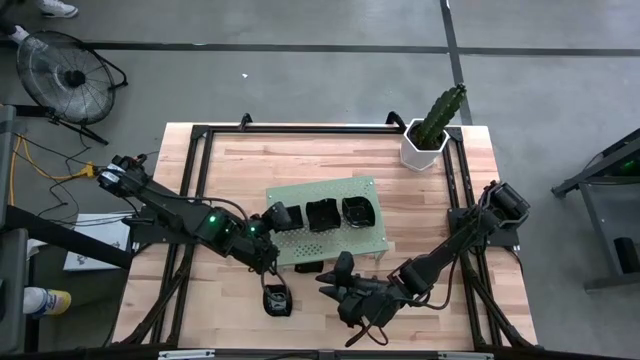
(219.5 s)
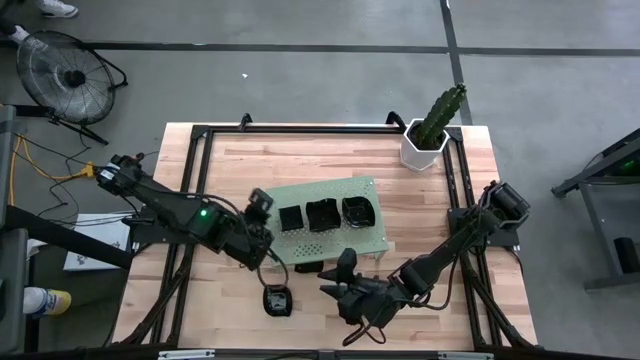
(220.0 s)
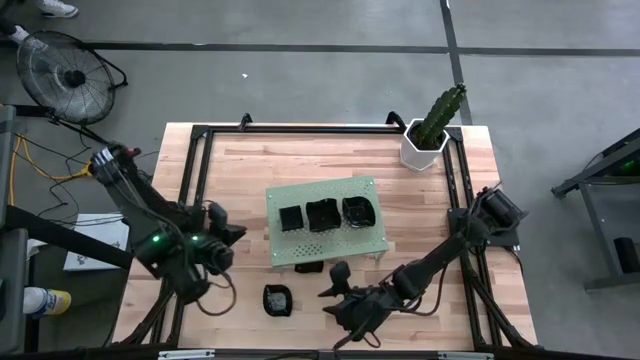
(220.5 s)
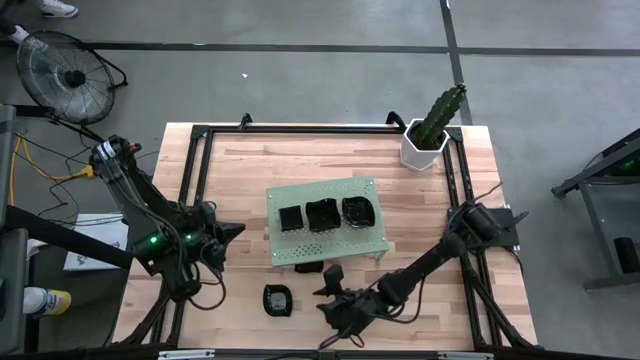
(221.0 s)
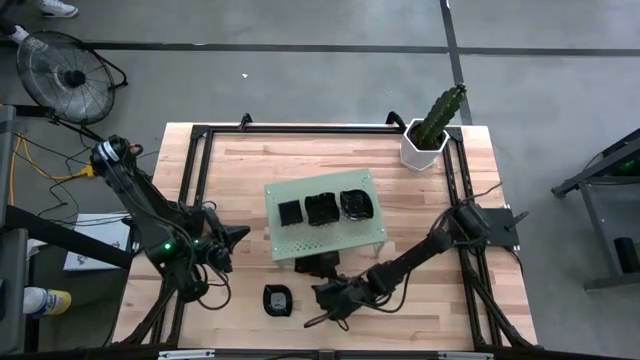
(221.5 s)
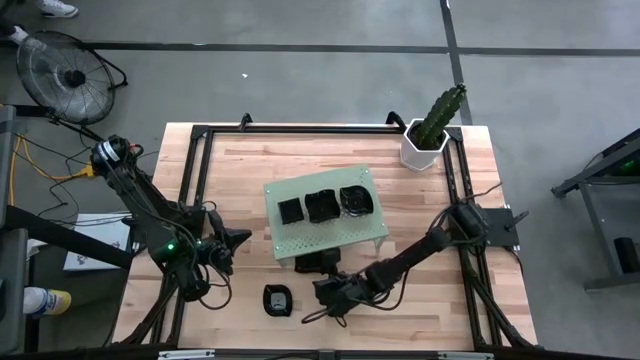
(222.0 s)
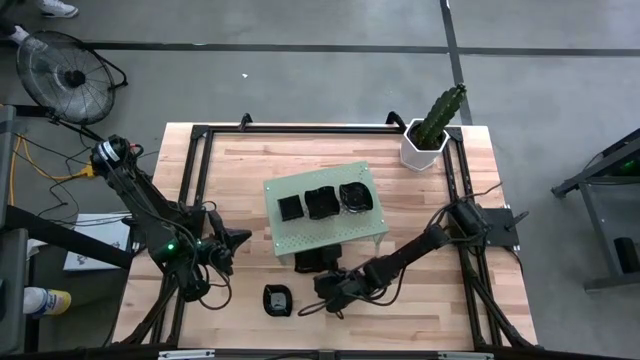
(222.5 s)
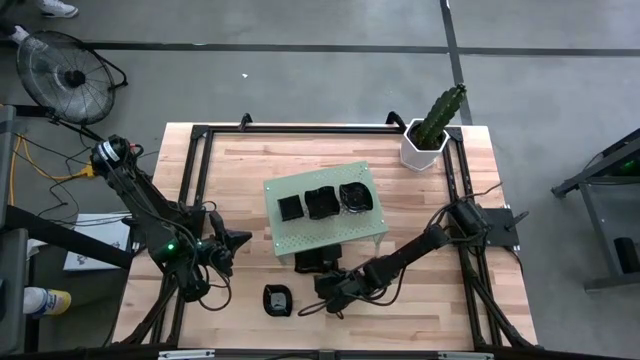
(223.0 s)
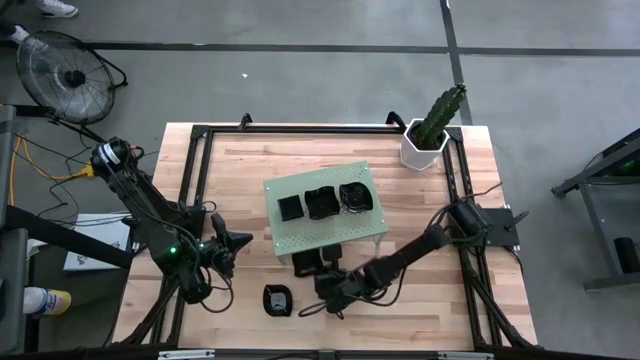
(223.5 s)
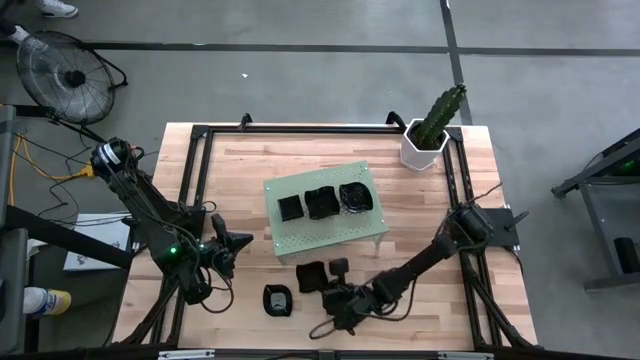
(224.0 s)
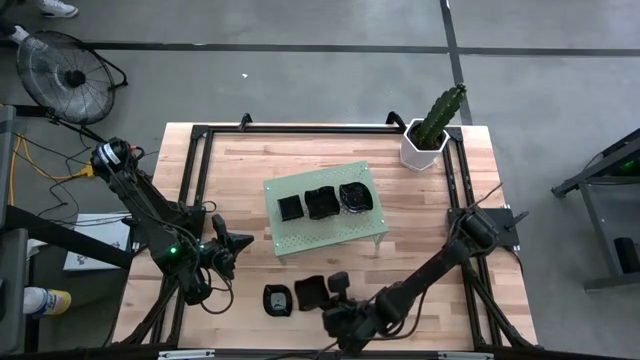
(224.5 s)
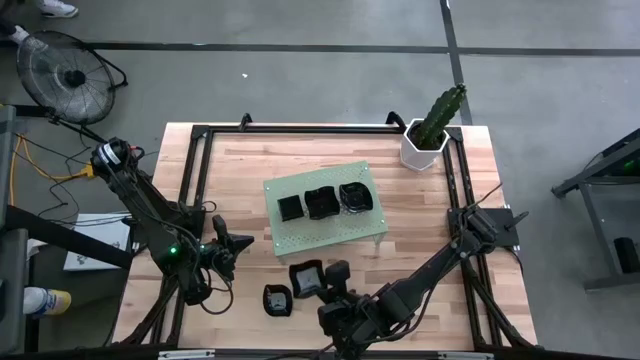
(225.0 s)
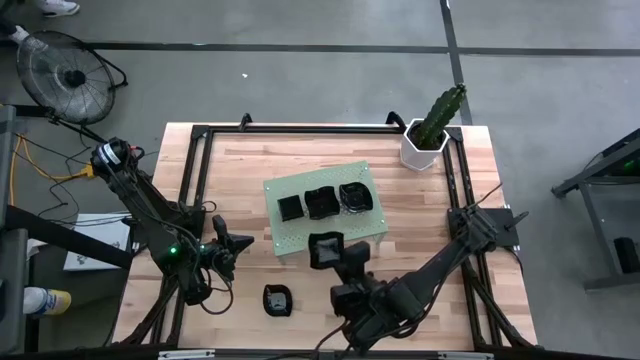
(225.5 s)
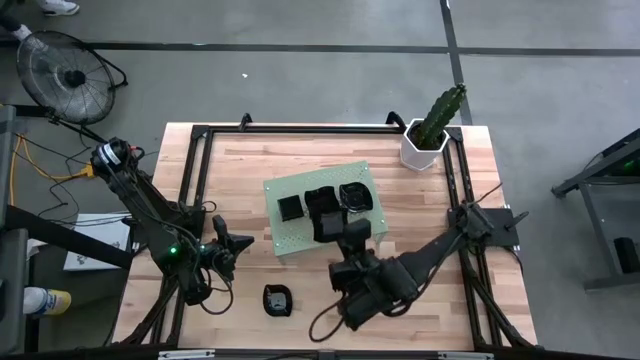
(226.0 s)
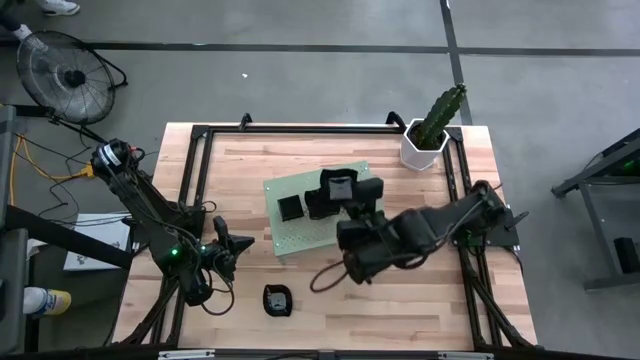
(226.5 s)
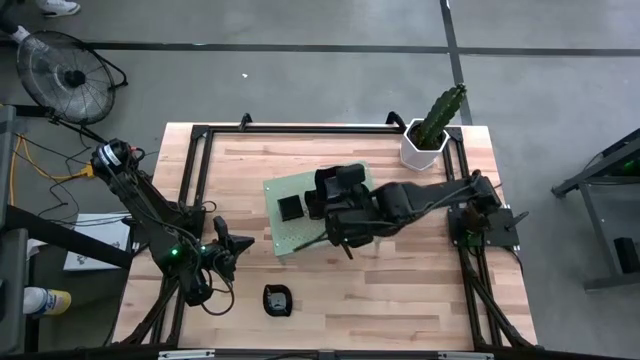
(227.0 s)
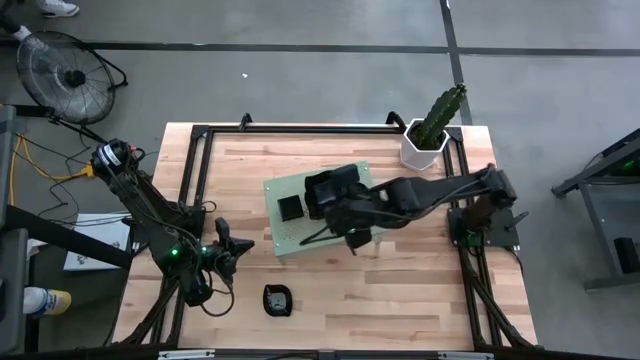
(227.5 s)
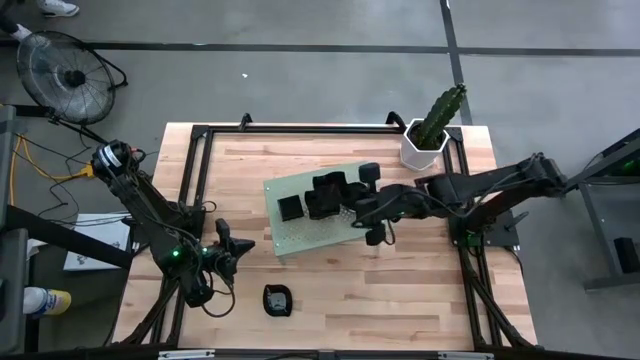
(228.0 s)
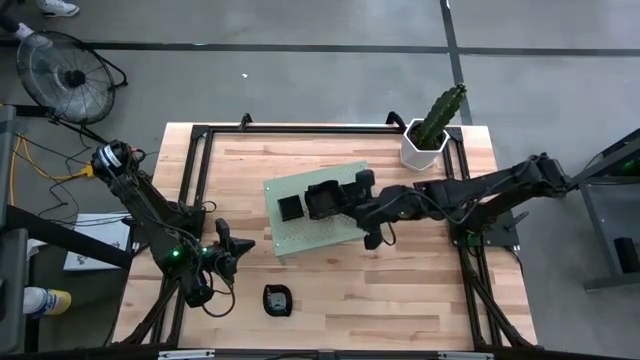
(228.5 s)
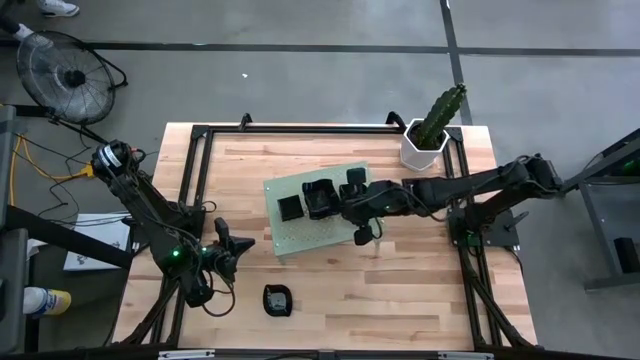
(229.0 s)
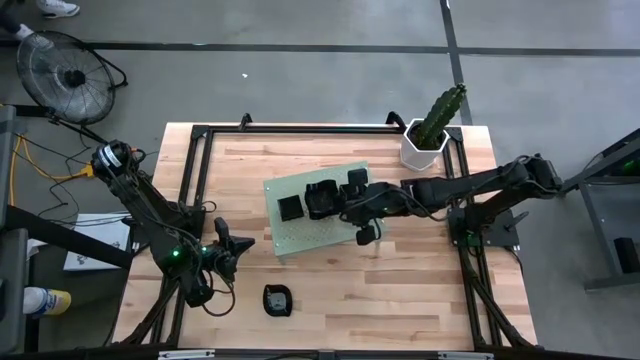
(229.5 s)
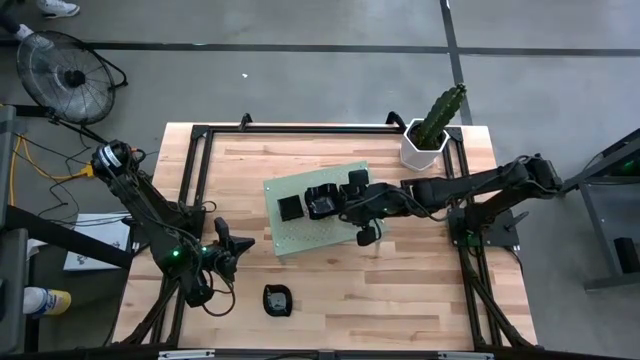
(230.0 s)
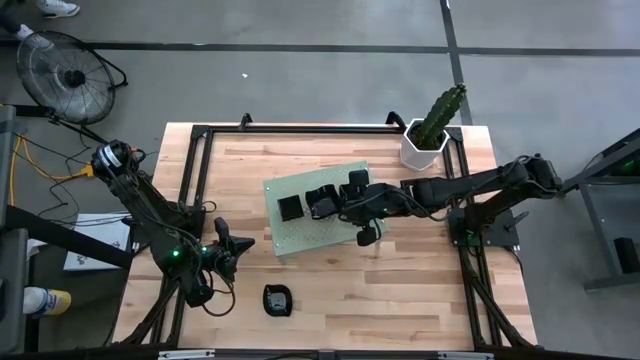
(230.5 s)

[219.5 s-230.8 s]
Task: Pick & Place Mini shaped plates
Stack the black wave square shaped bowl on top of the black wave square shaped bowl on the shelf

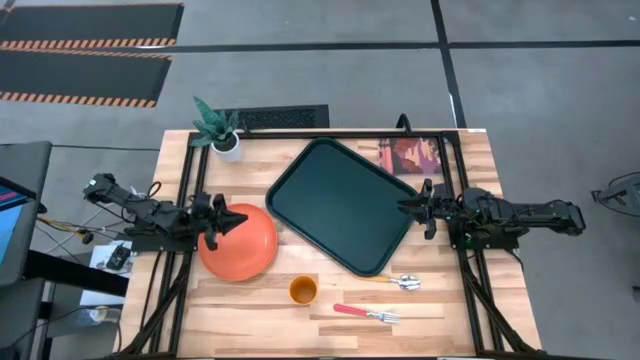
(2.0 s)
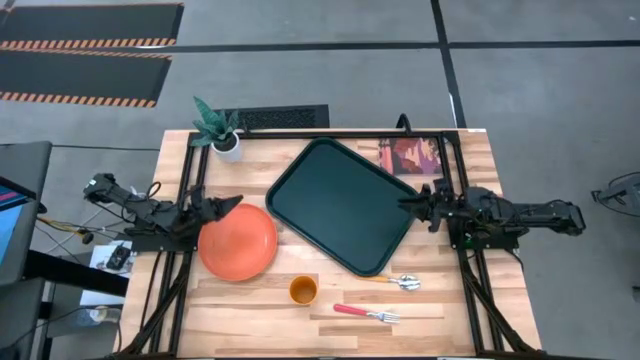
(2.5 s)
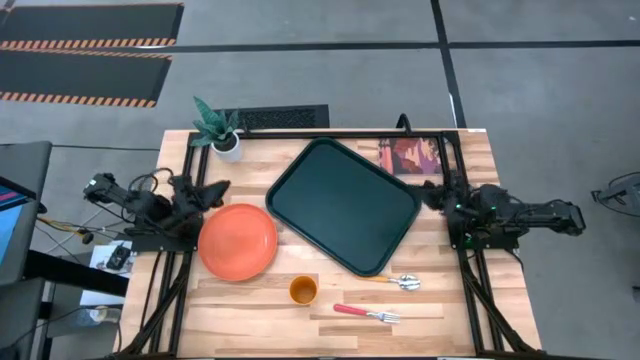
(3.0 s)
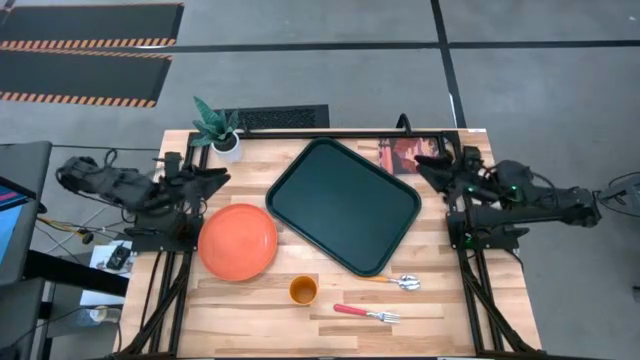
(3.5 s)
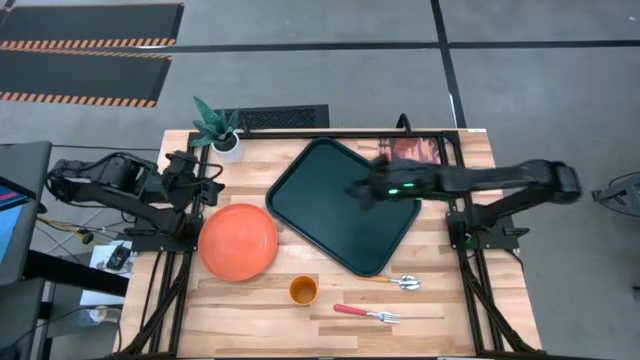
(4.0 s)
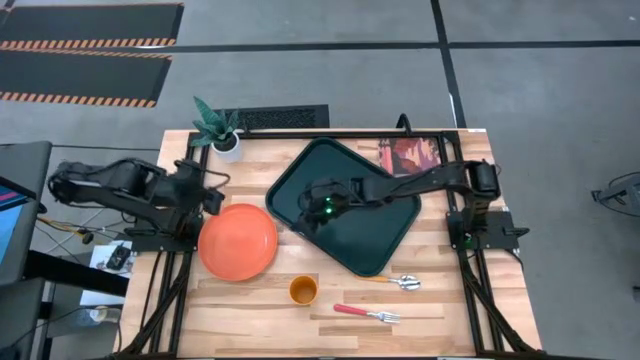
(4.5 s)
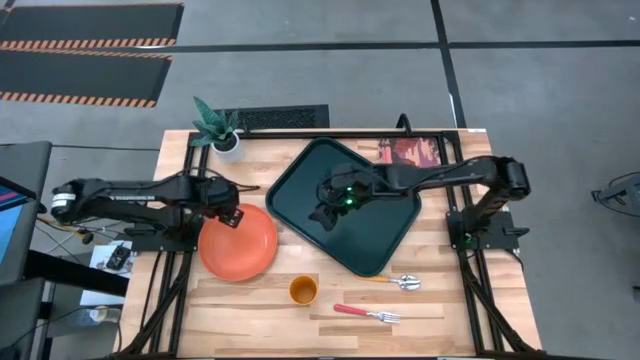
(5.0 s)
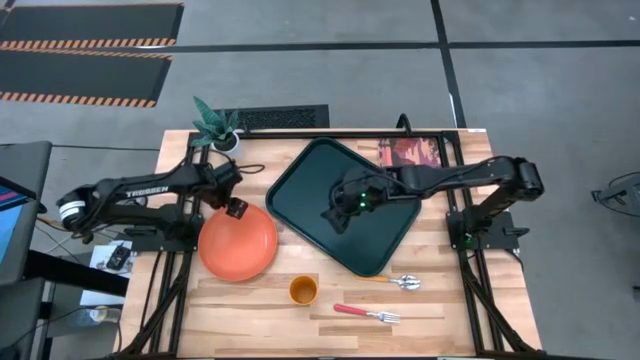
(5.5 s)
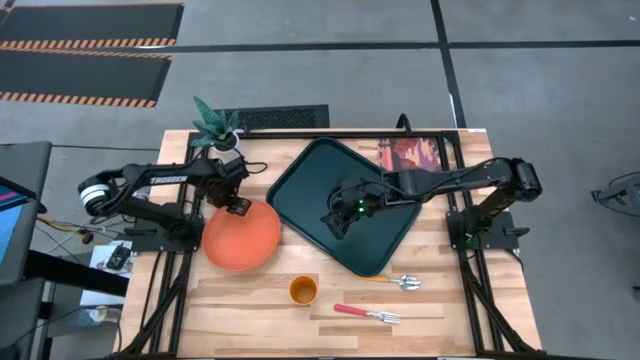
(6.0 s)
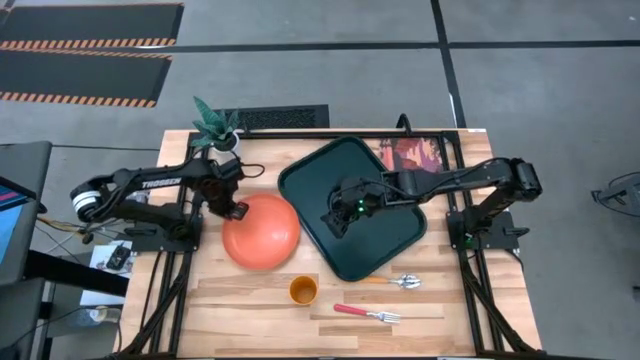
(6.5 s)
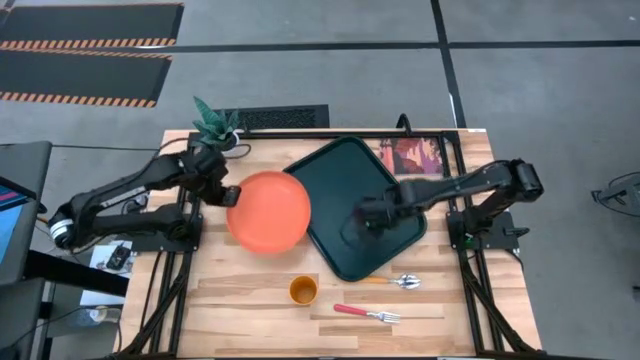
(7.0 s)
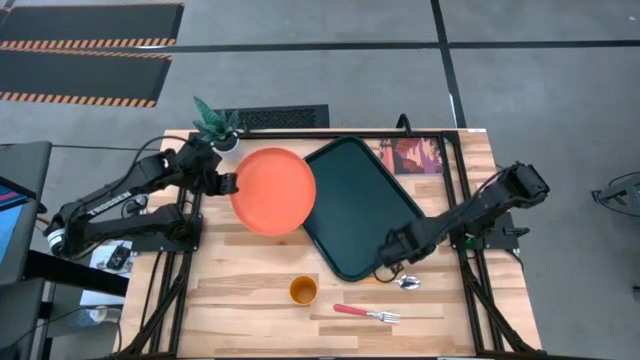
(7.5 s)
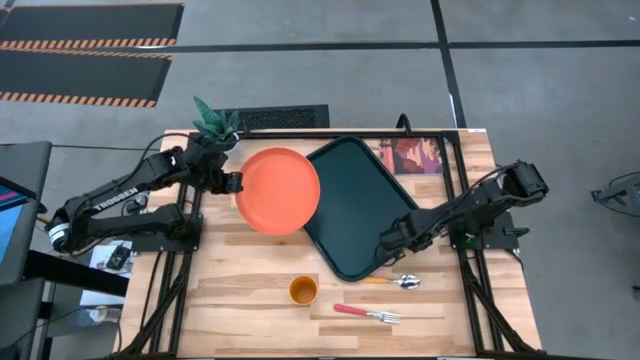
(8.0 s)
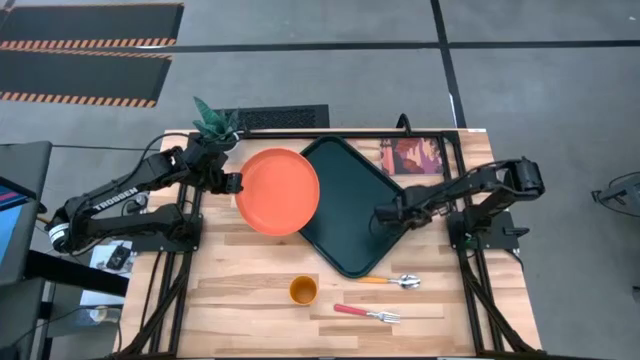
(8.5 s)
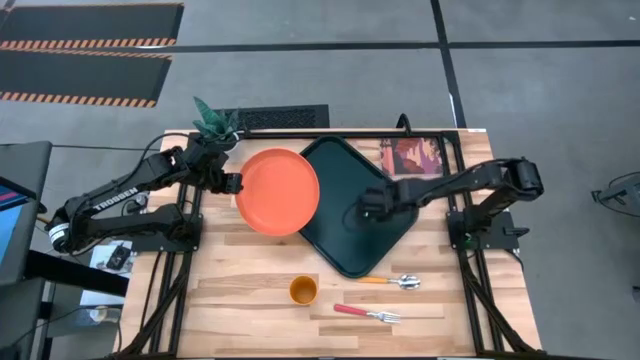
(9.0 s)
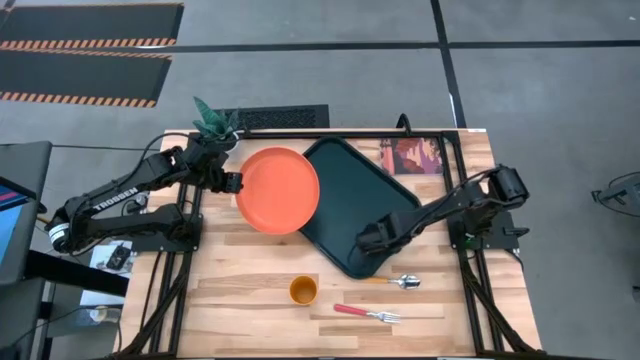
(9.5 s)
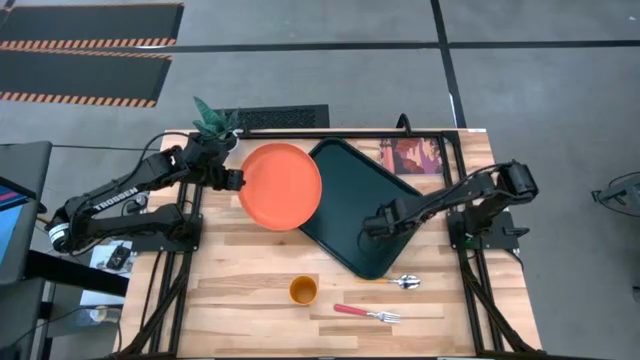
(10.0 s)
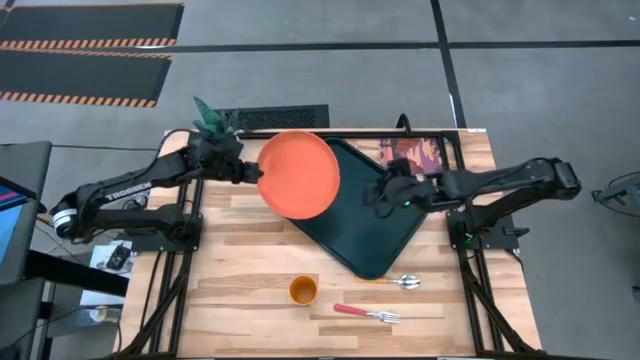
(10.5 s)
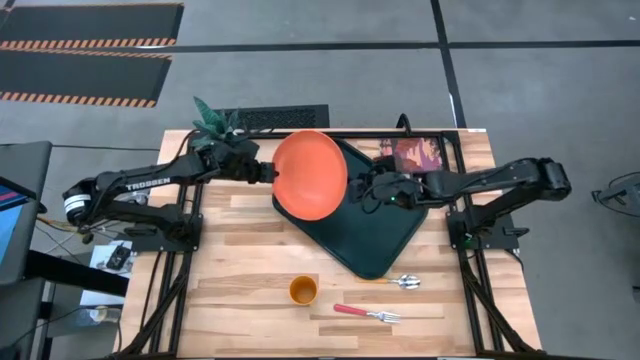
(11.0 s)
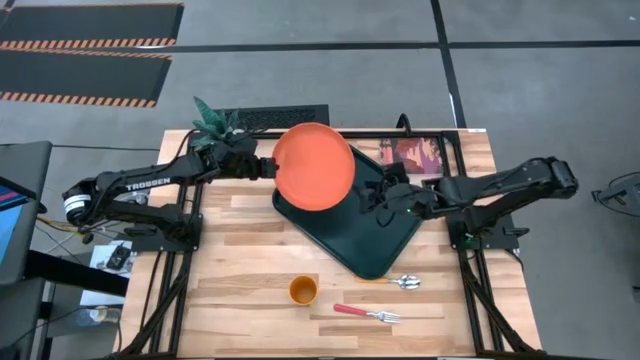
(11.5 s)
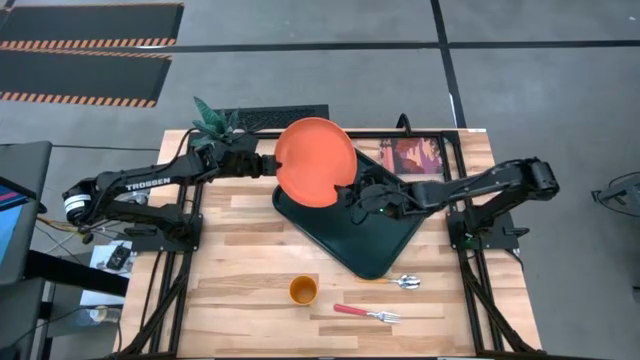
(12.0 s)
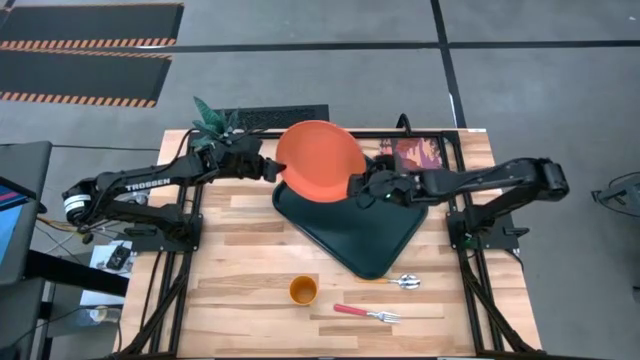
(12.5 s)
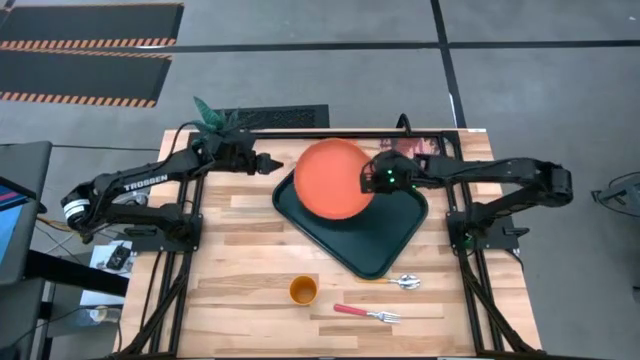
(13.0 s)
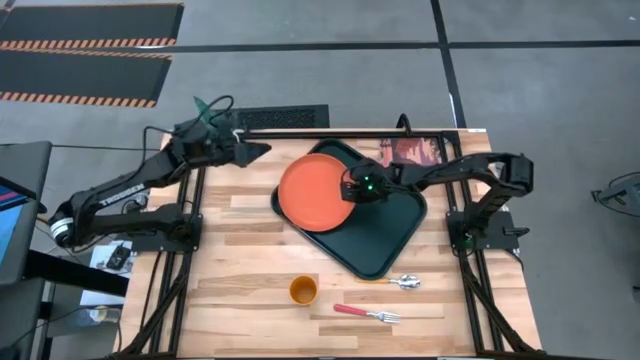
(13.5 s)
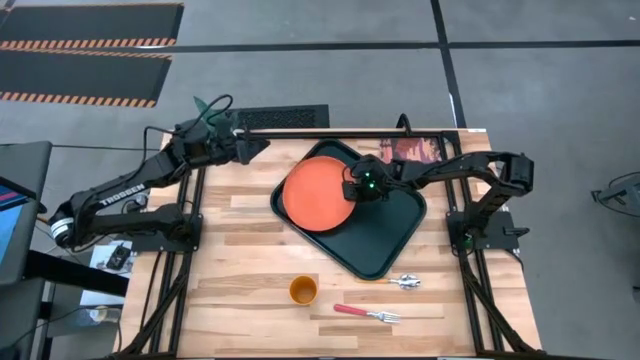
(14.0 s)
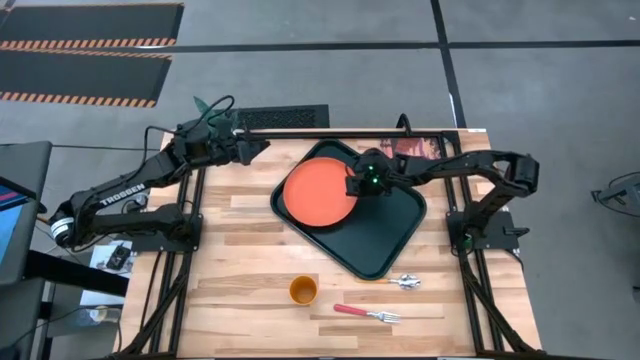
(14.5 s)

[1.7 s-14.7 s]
Task: Pick and place plate/cup/fork/spoon on tray
Put the orange plate on the black tray
